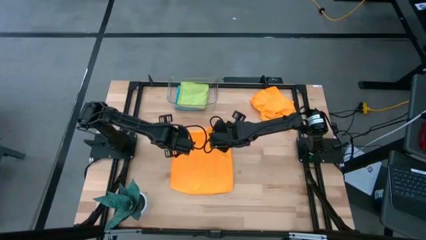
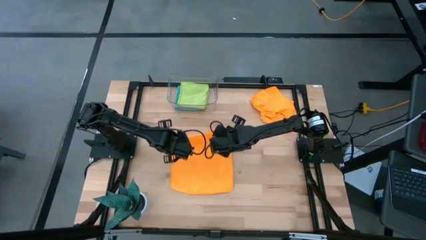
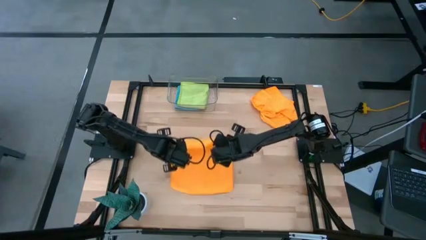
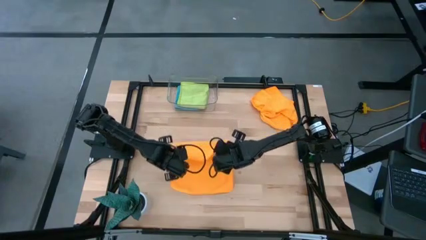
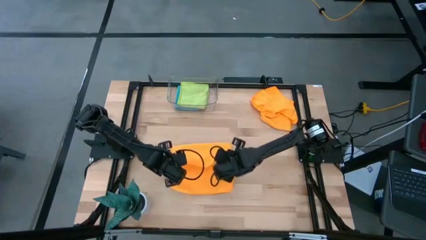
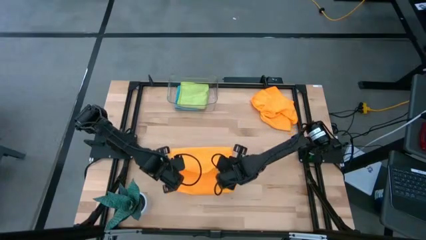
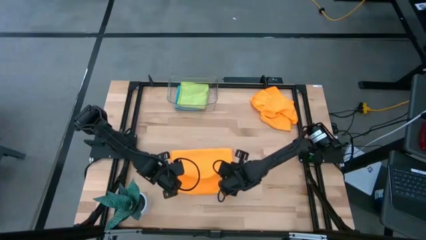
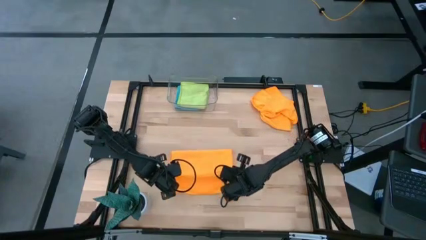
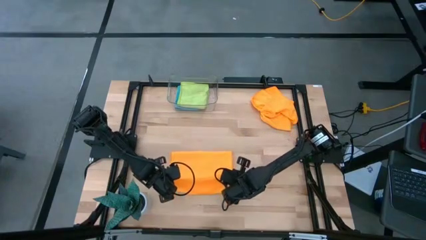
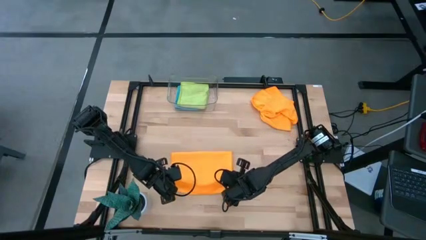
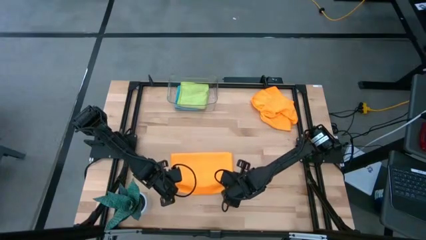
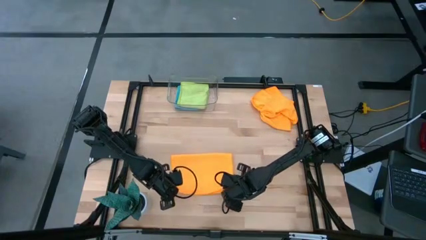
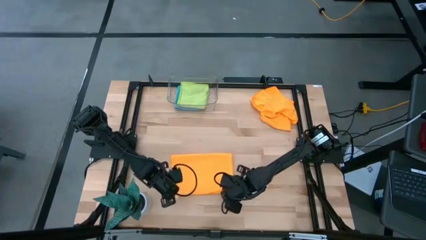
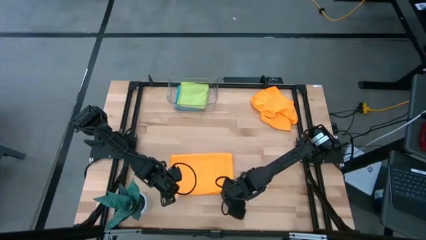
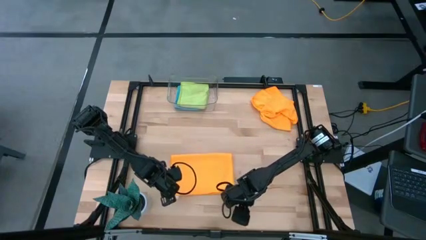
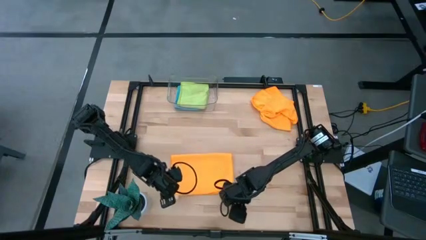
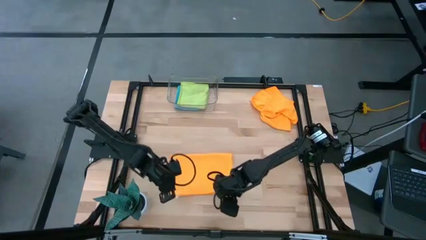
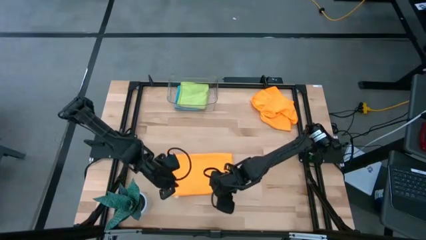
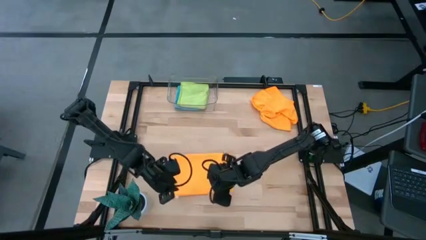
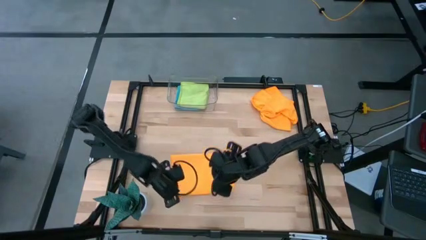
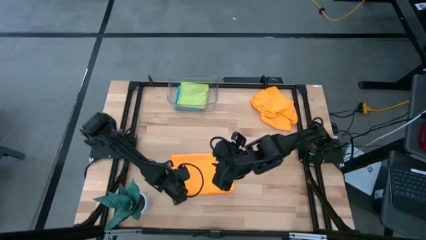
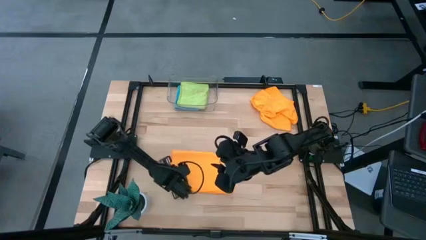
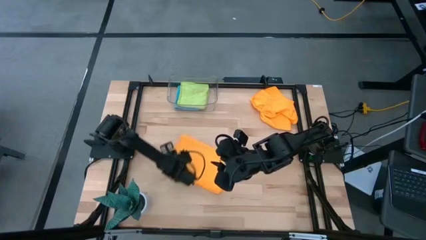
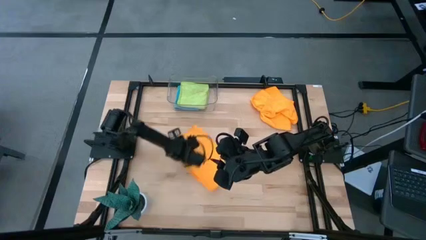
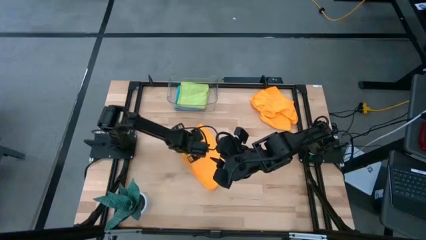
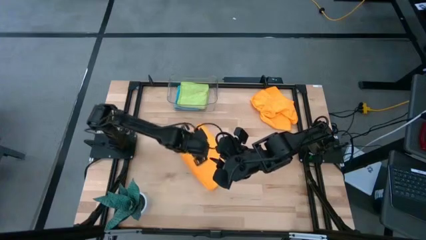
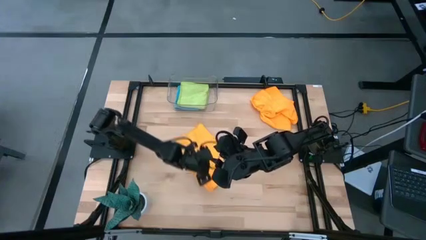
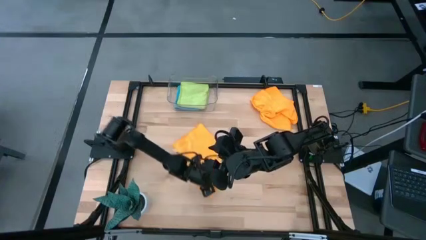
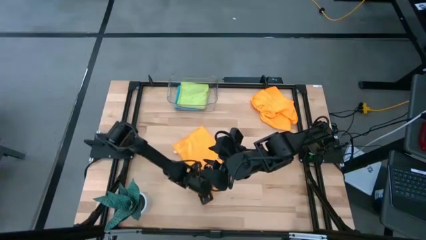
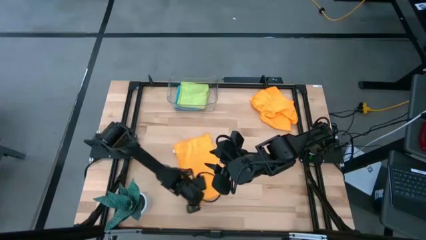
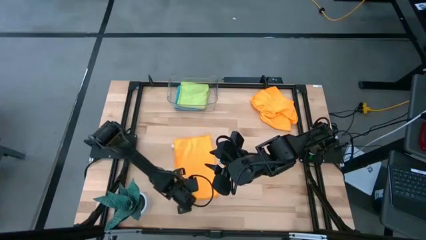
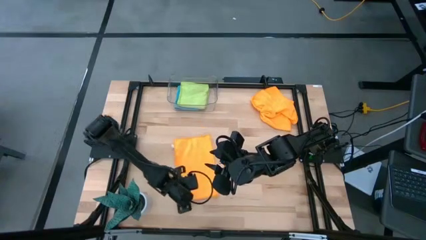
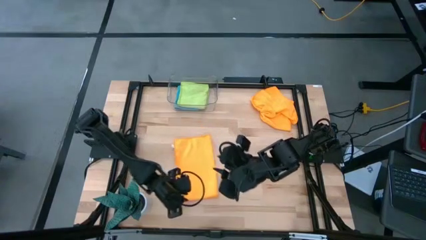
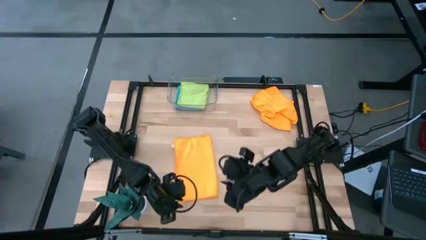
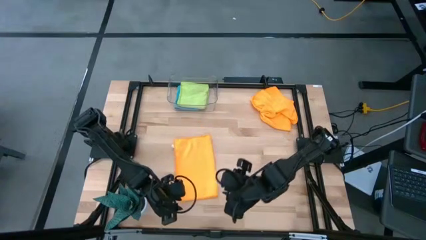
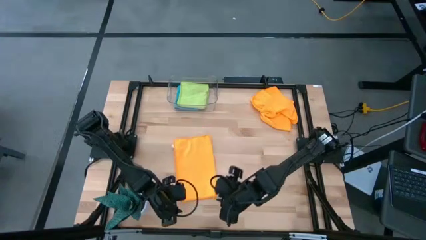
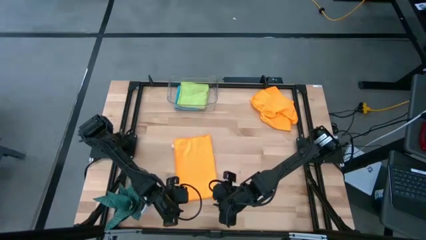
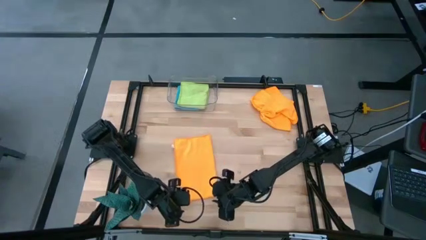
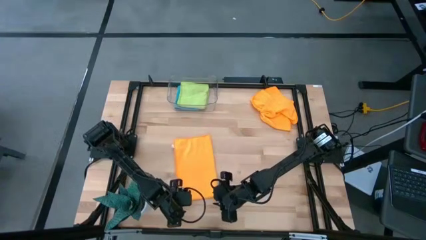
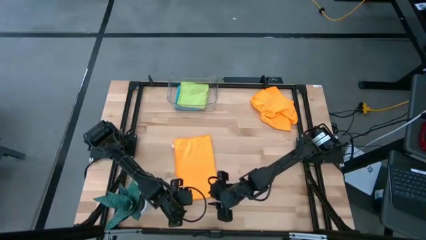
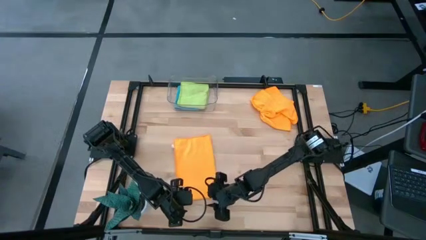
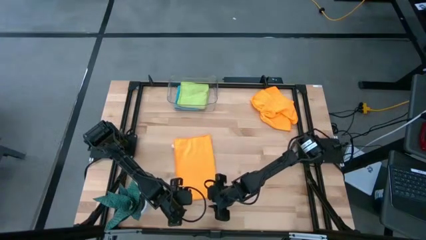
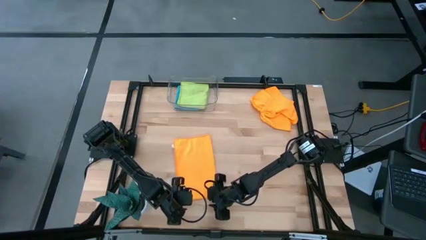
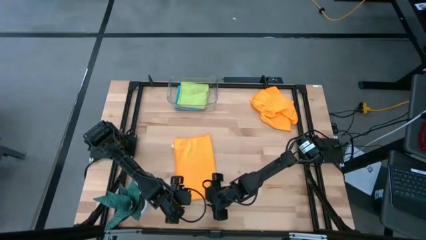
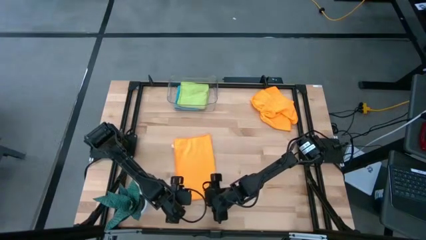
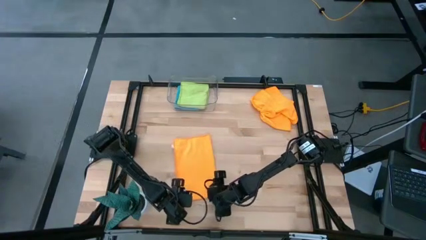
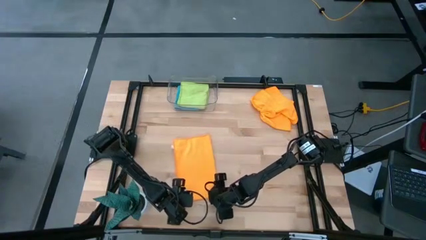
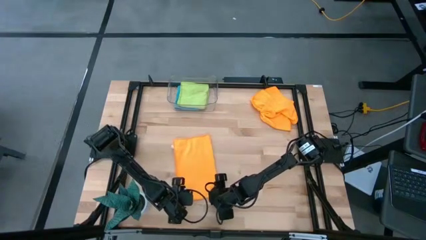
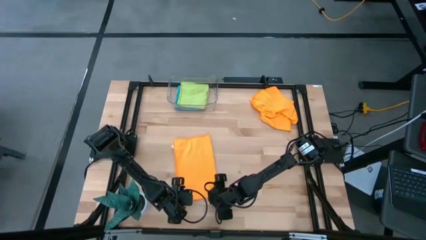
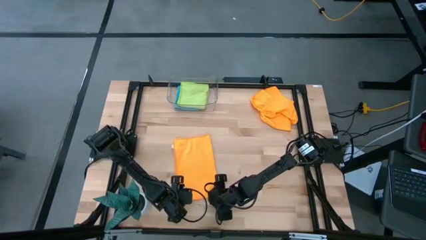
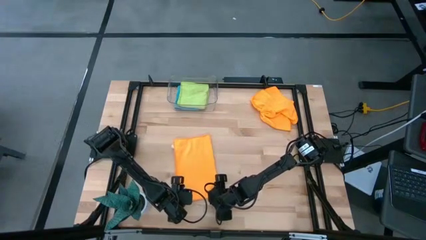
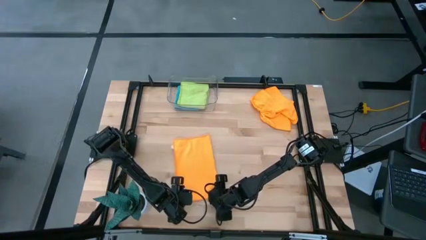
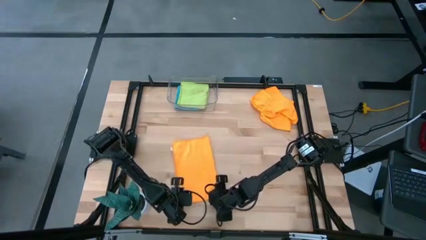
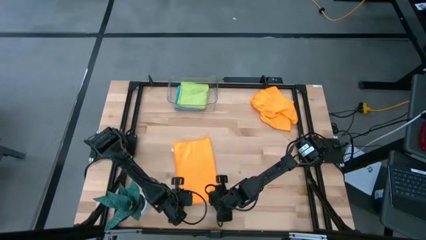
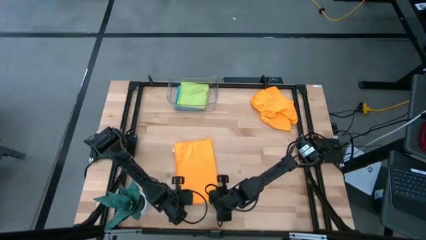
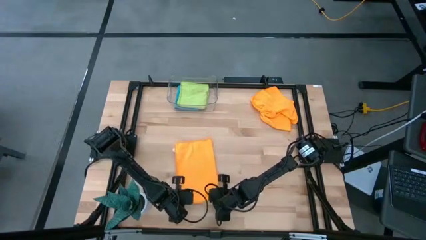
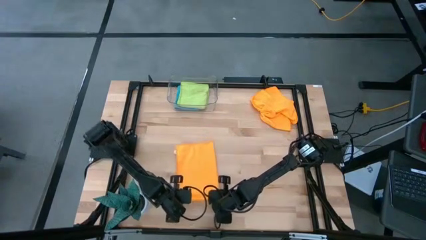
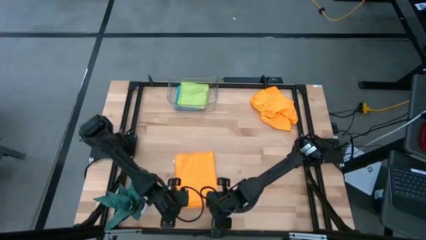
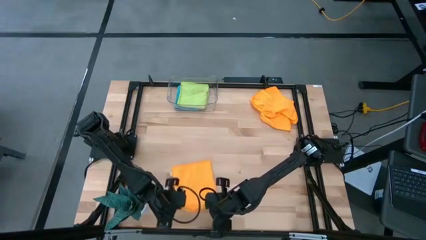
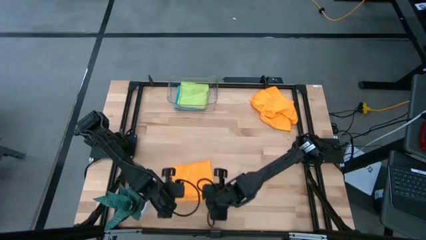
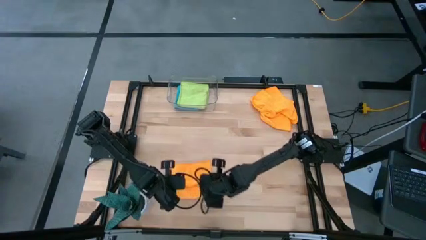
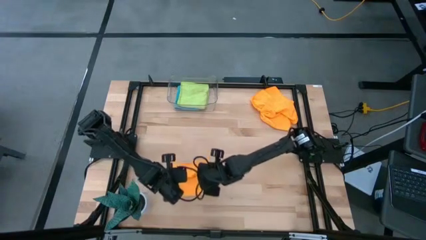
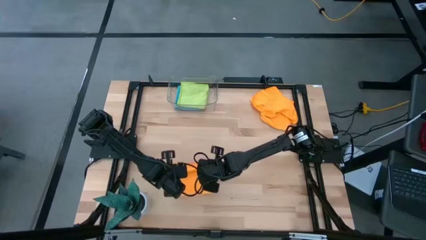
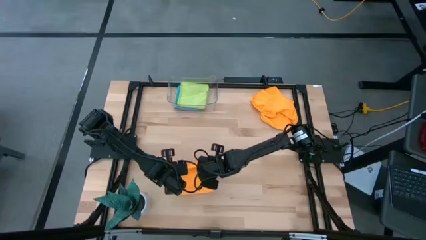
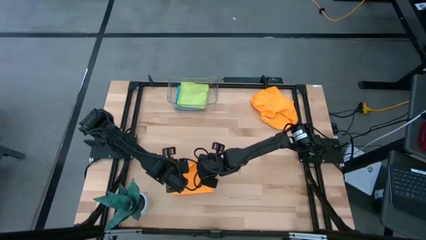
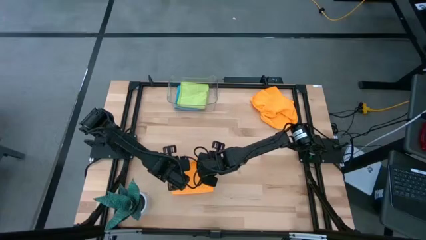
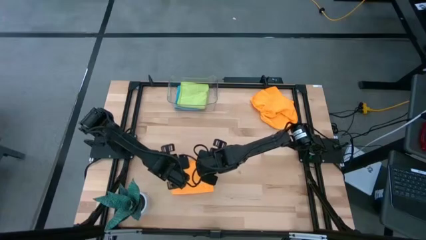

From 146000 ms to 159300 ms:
Task: Fold microfiber towels
Fold the bottom orange microfiber cloth

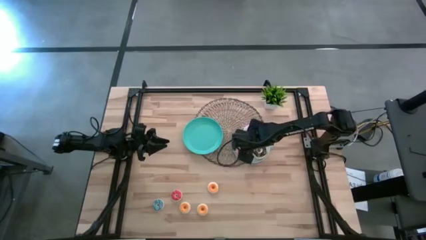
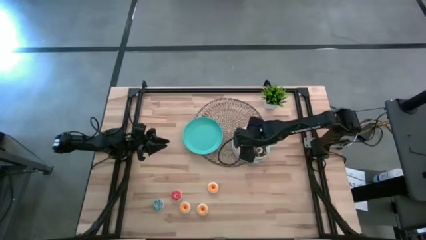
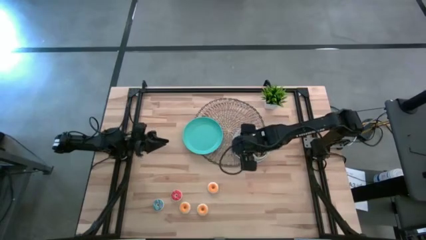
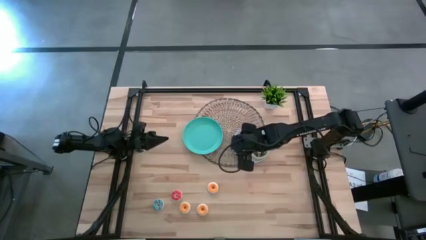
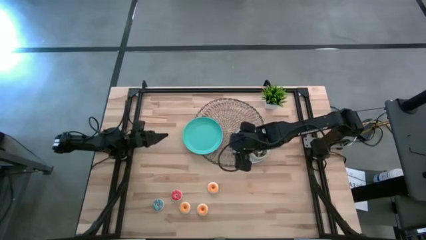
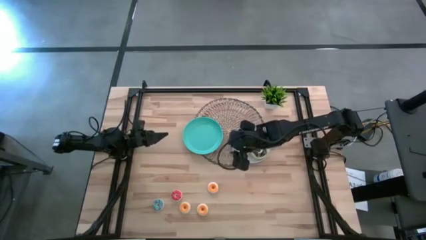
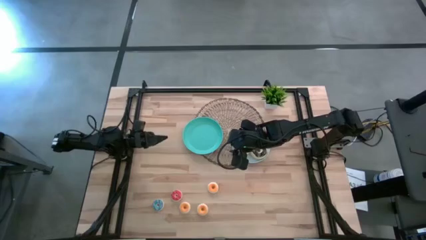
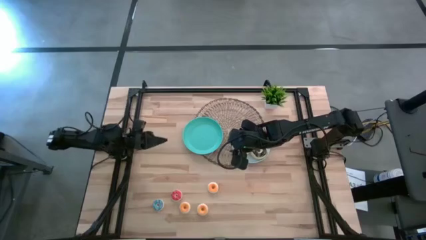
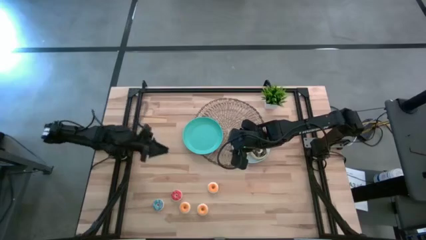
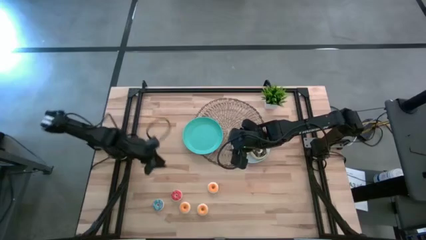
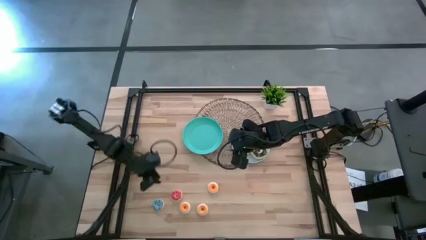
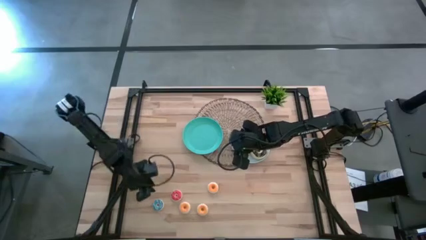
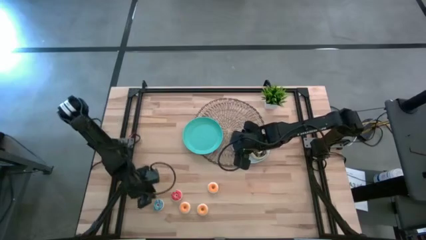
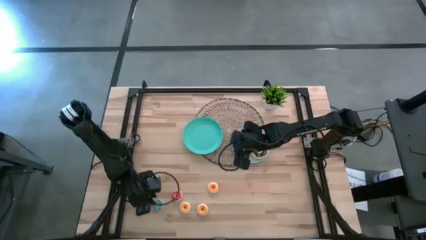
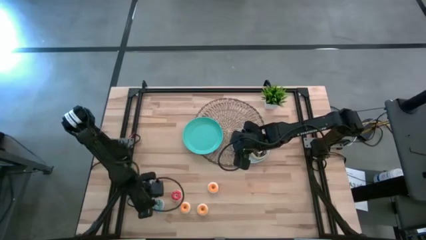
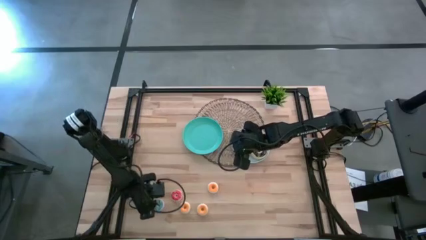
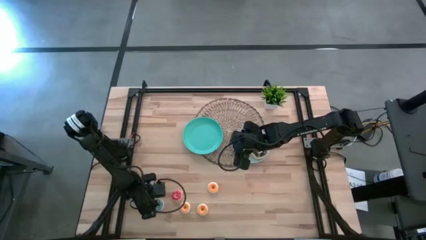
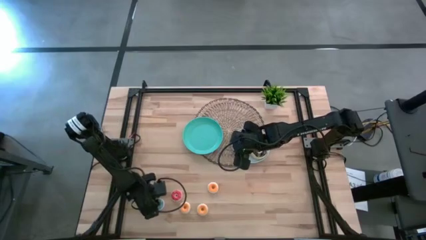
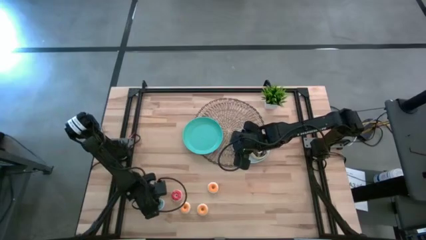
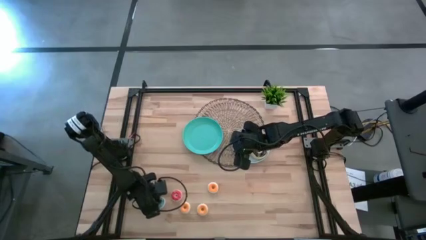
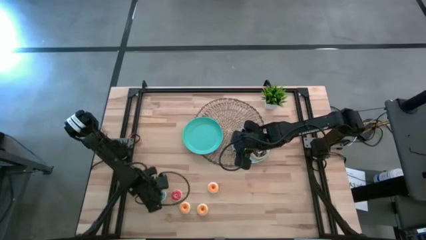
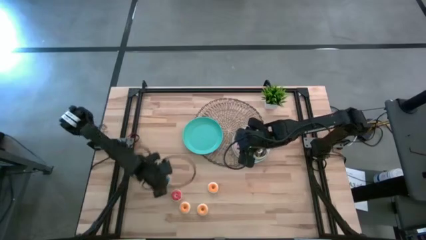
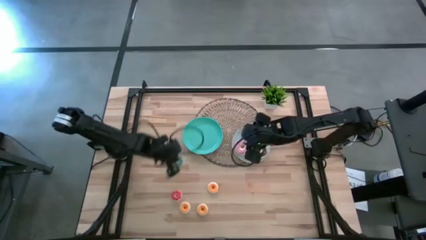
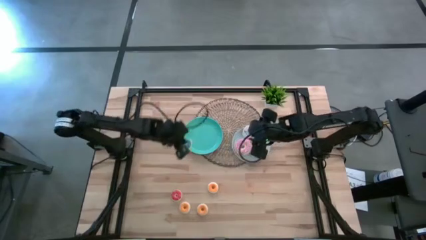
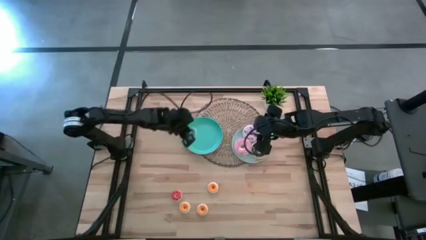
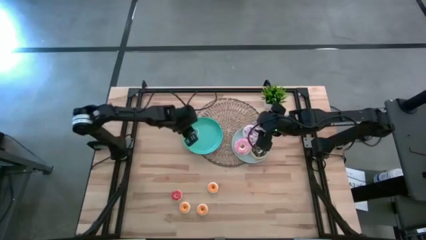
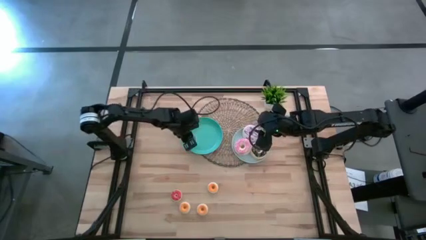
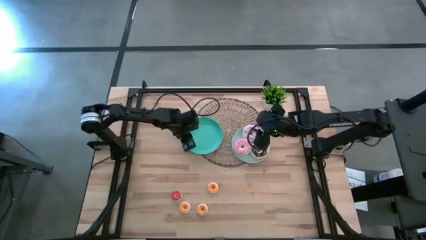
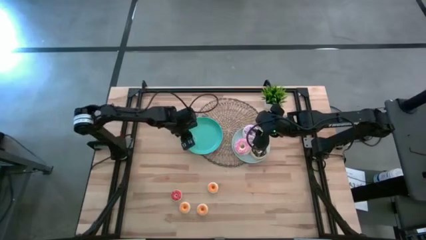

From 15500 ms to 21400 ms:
Task: Pick & Place donuts
Put the small blue donut on the green plate
